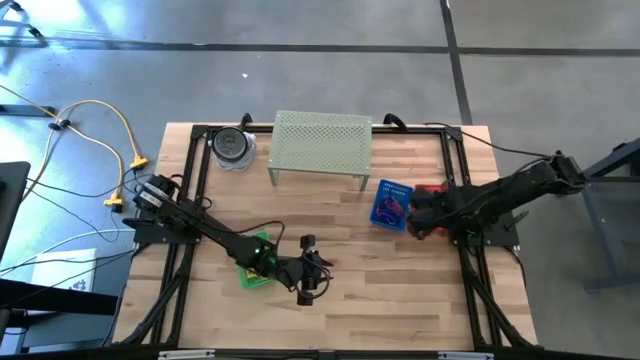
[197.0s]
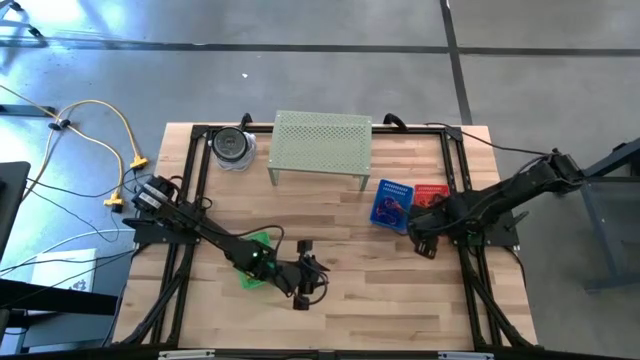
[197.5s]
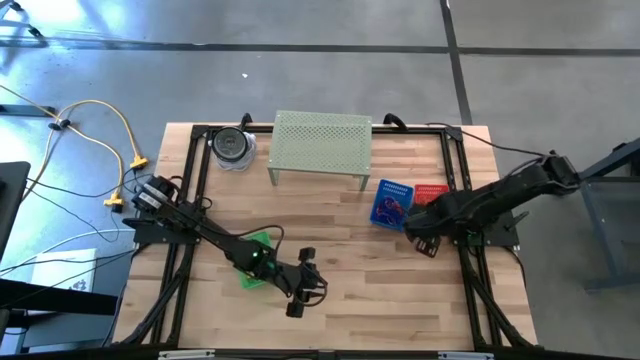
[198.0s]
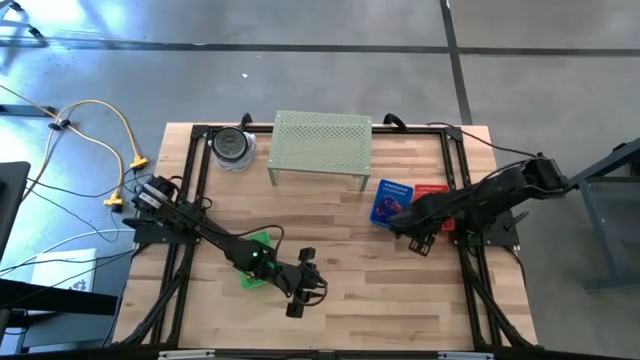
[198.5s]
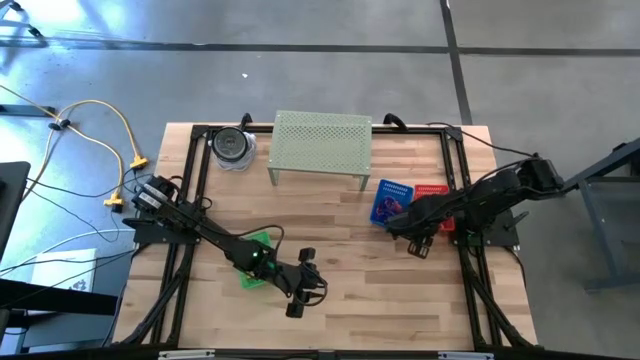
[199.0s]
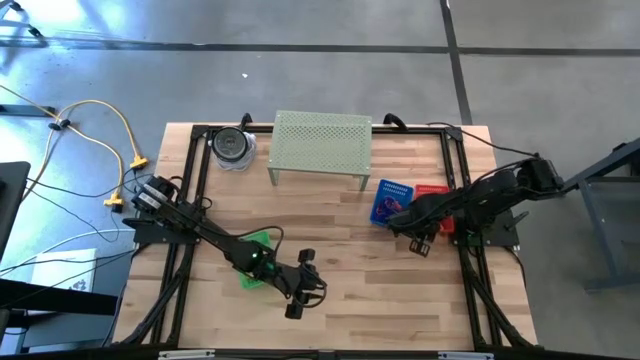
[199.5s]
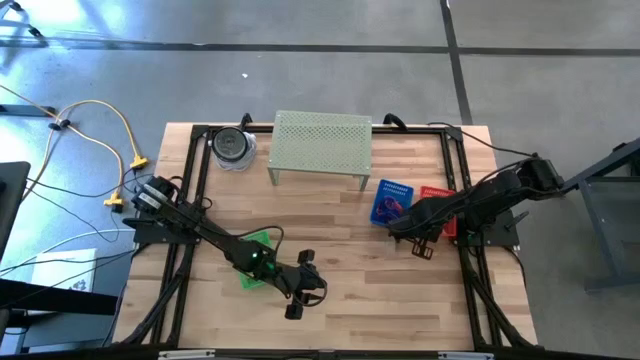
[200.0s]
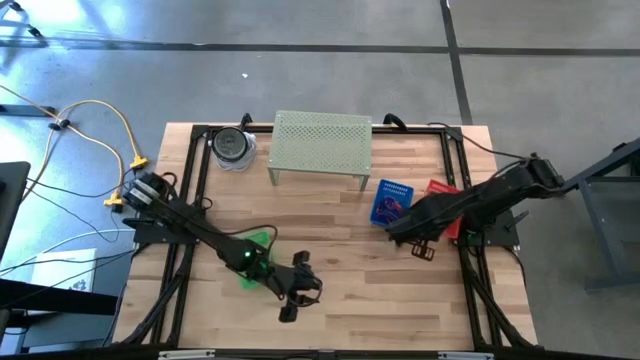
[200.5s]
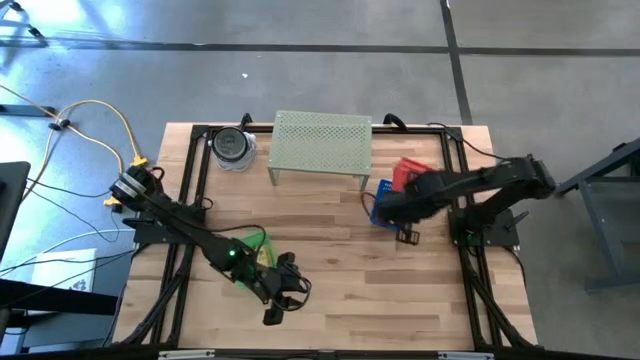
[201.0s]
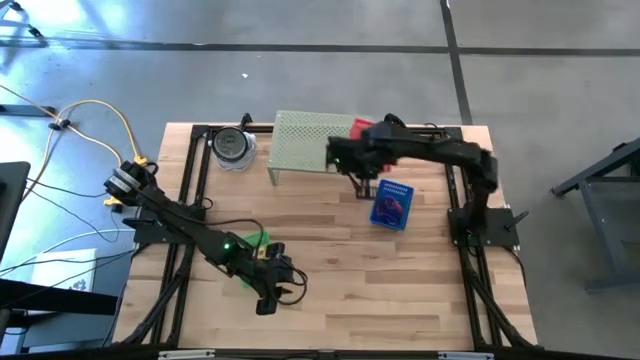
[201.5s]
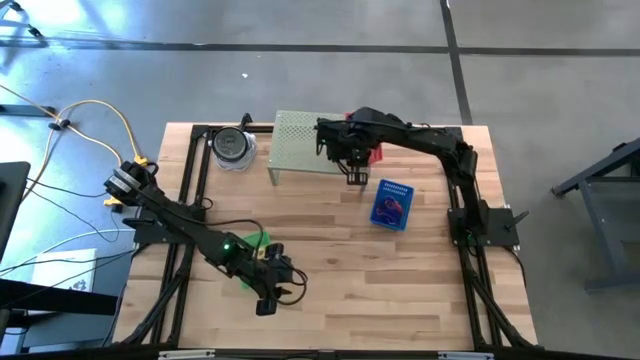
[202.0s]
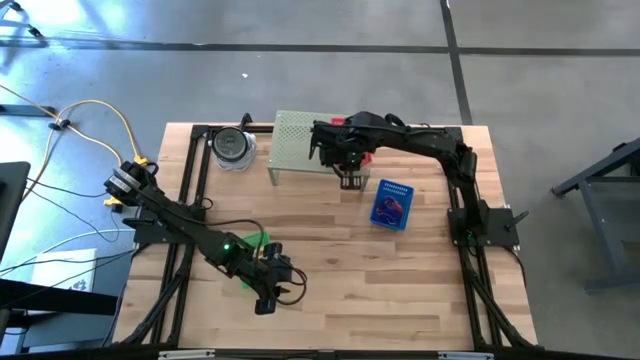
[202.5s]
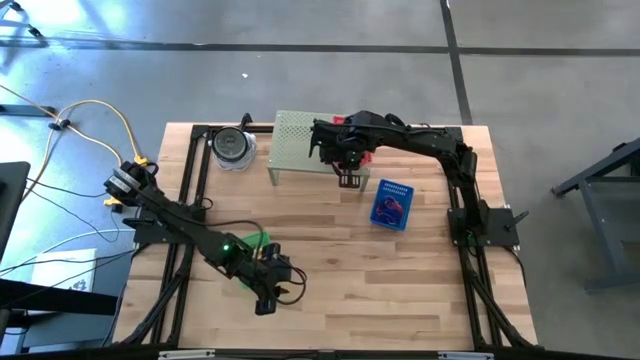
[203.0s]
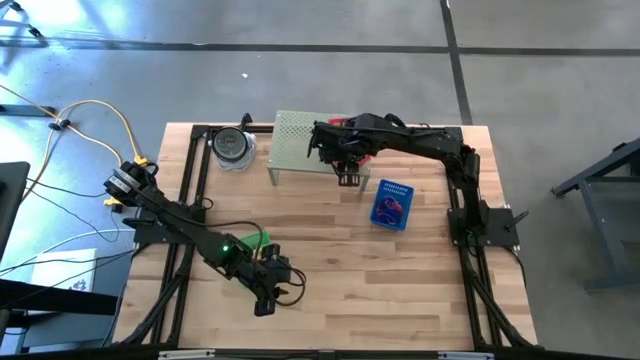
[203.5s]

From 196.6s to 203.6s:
Task: Pick & Place Office Desk Supplies
Put the red bin on the shelf

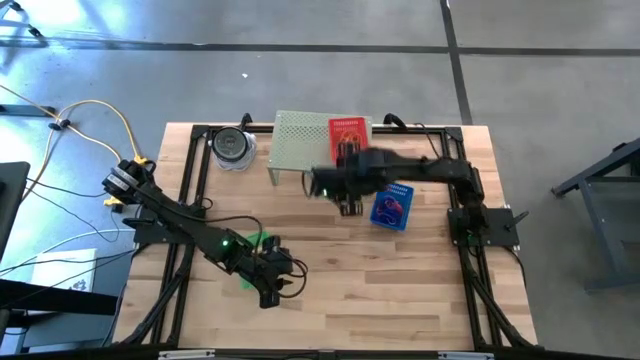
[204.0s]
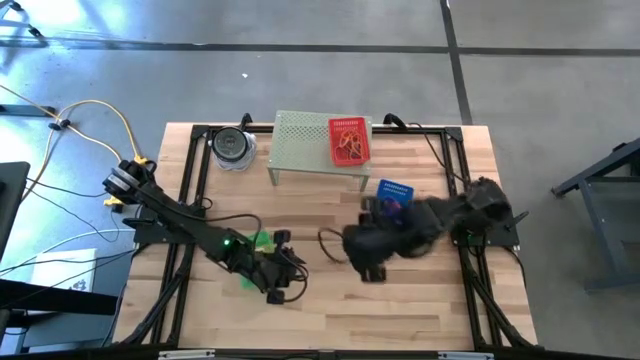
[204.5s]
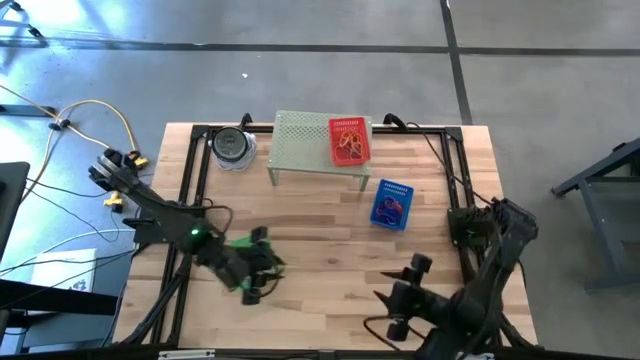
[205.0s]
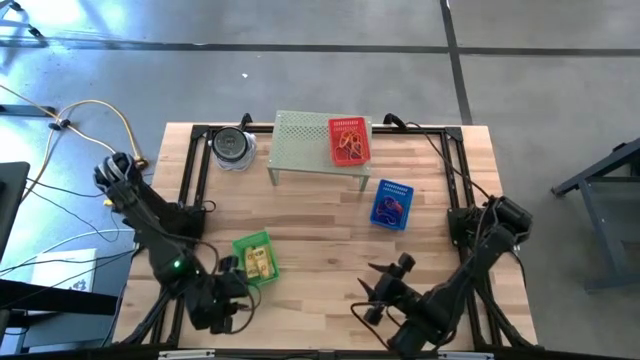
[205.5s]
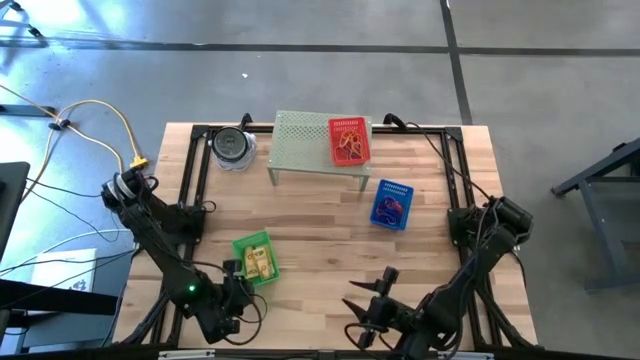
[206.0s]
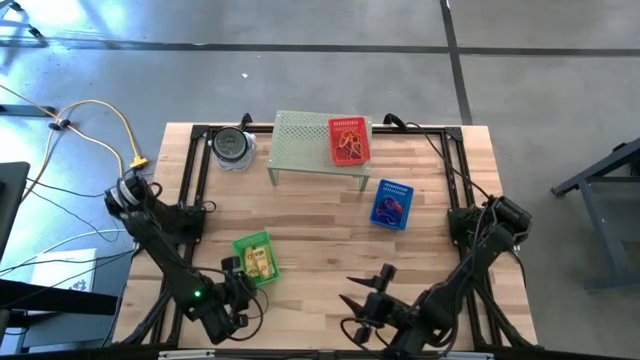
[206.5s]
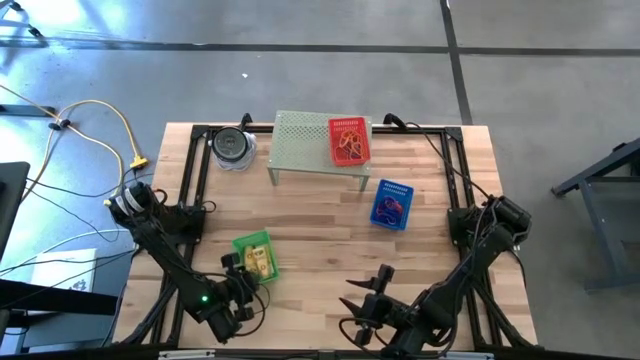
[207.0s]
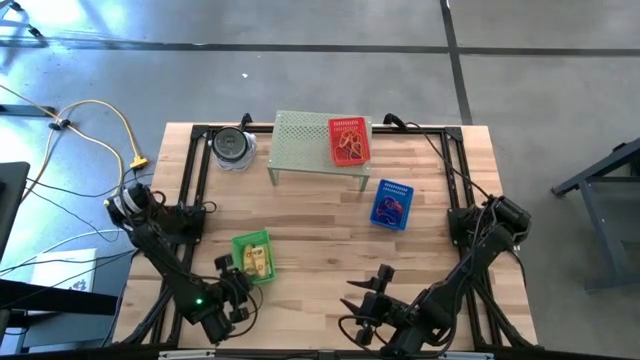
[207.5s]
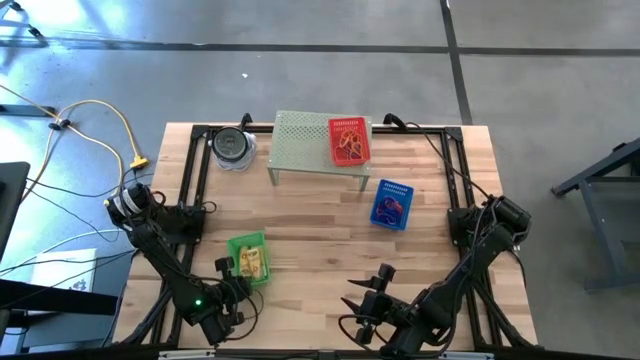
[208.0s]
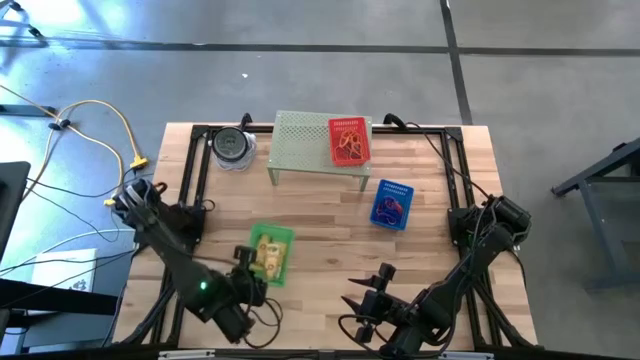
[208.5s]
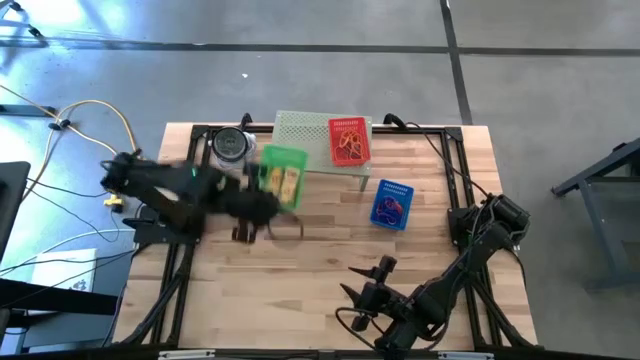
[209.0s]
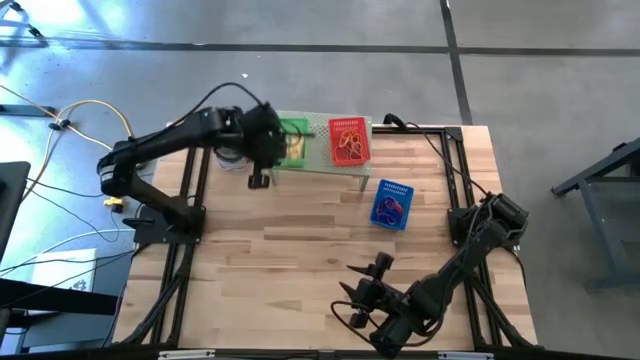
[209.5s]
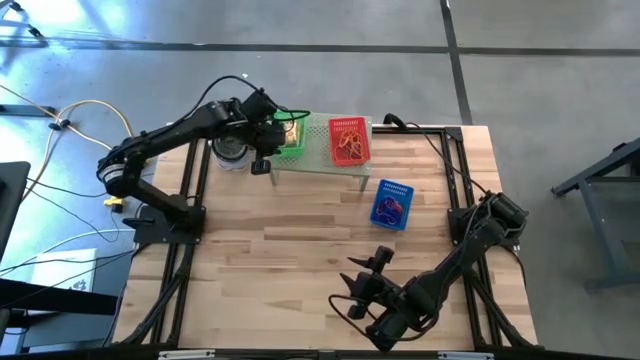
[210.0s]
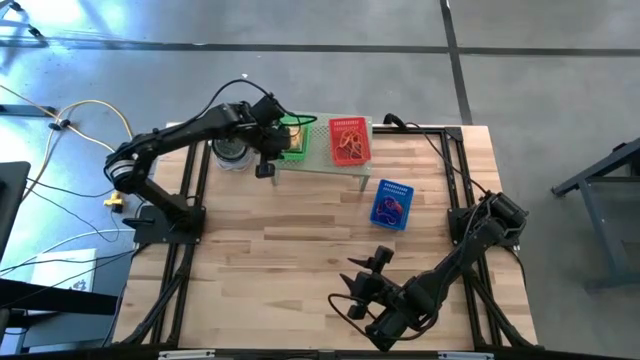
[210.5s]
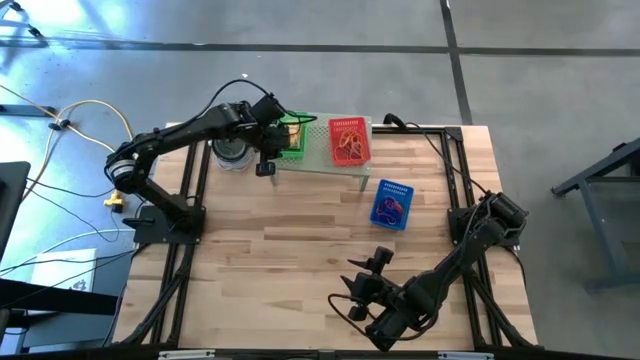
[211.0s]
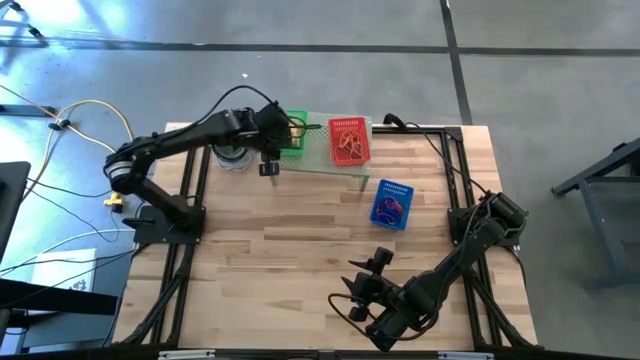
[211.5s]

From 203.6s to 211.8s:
Put the green on the shelf

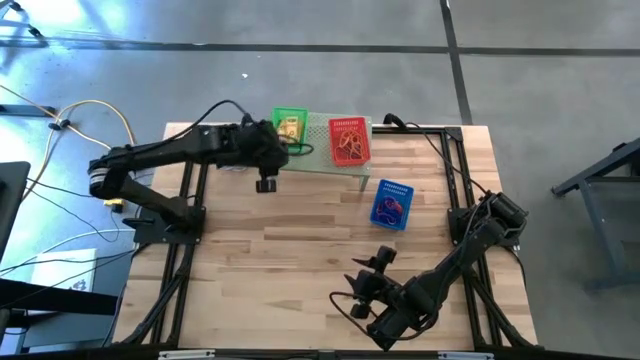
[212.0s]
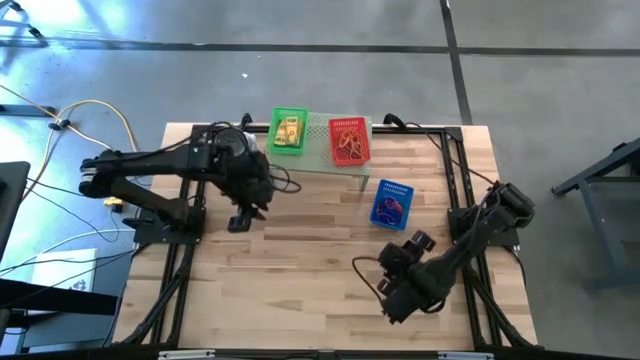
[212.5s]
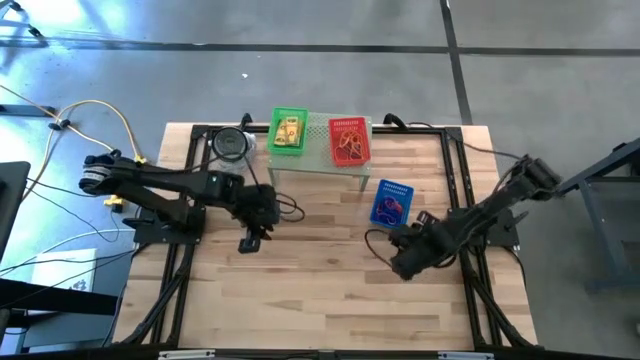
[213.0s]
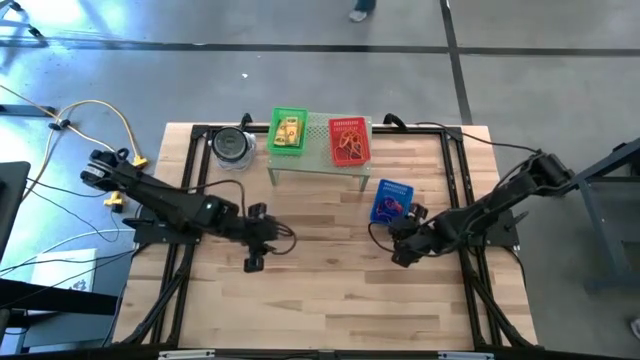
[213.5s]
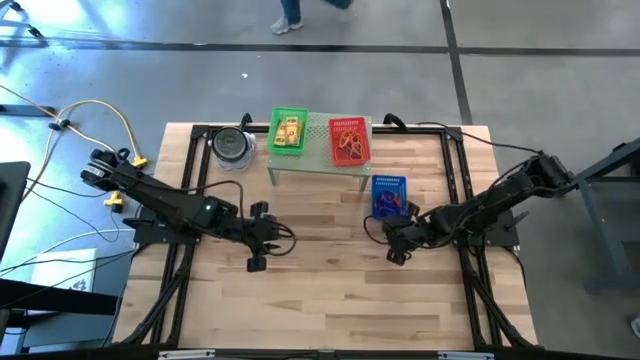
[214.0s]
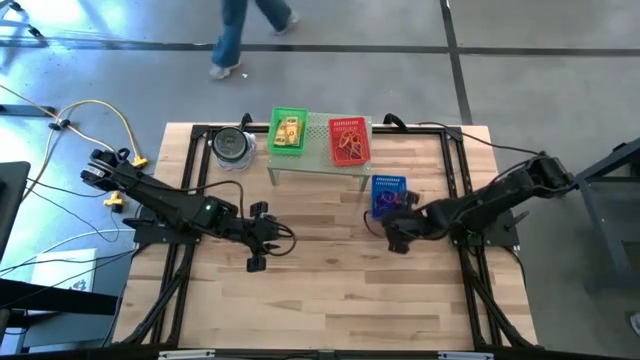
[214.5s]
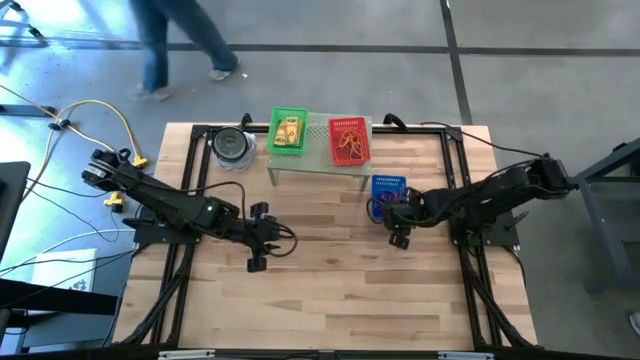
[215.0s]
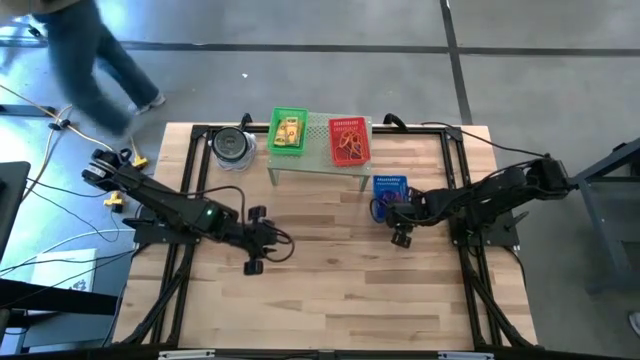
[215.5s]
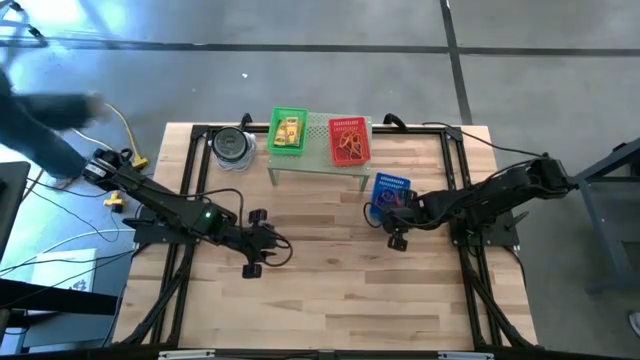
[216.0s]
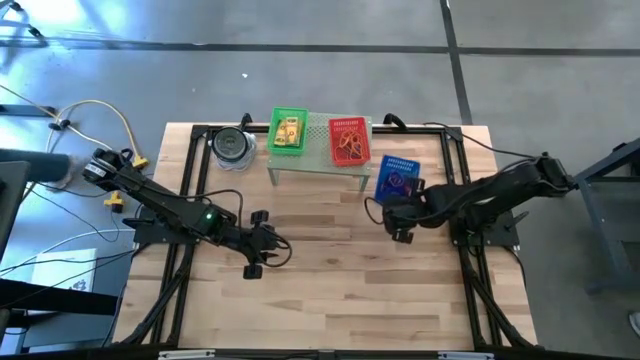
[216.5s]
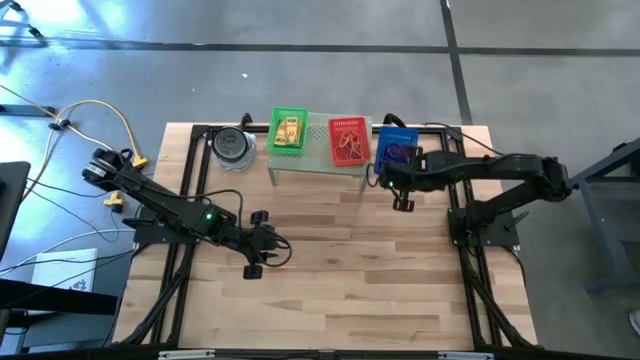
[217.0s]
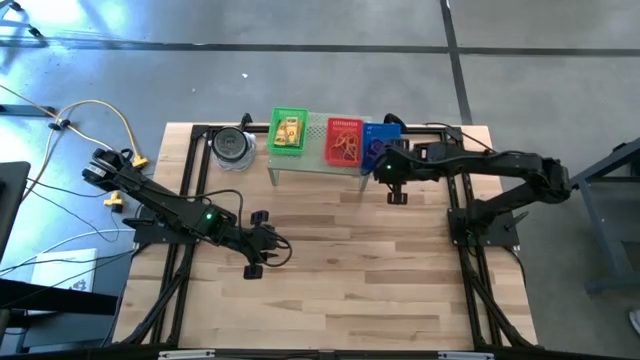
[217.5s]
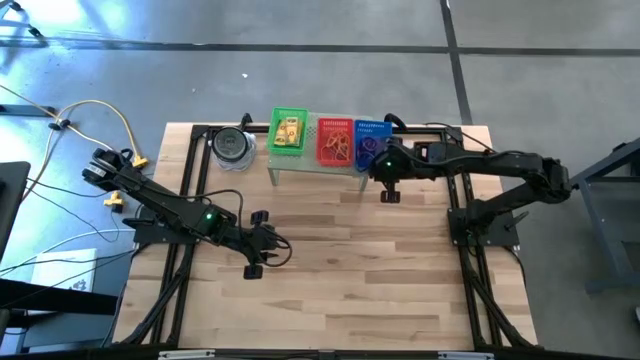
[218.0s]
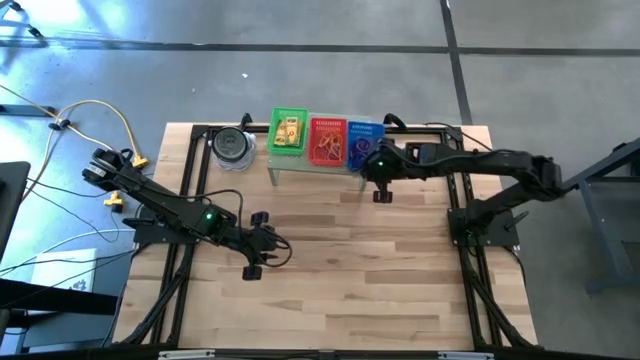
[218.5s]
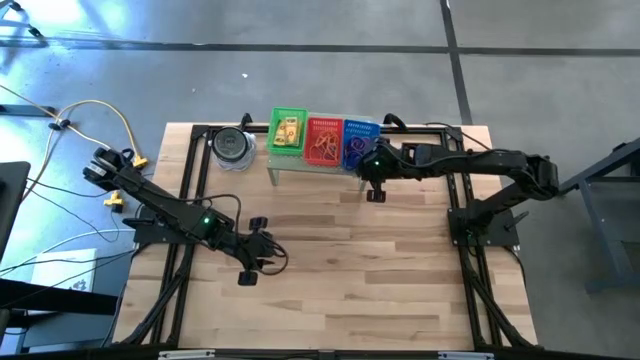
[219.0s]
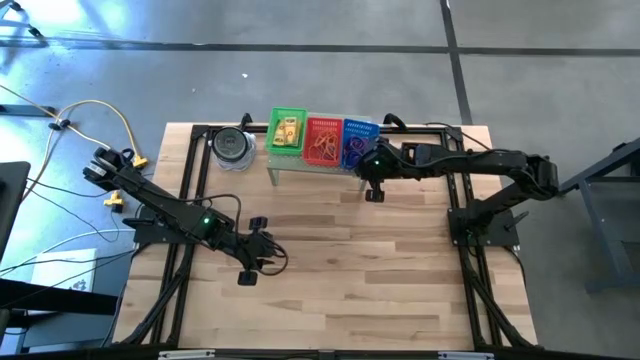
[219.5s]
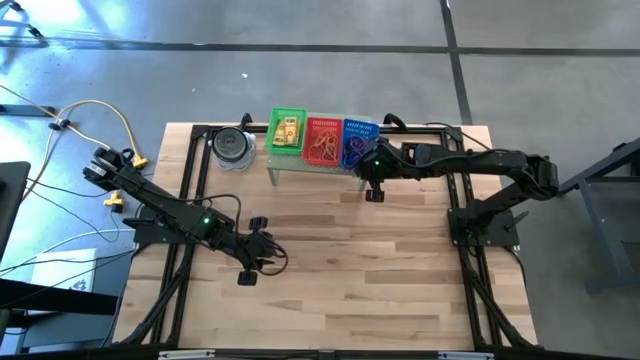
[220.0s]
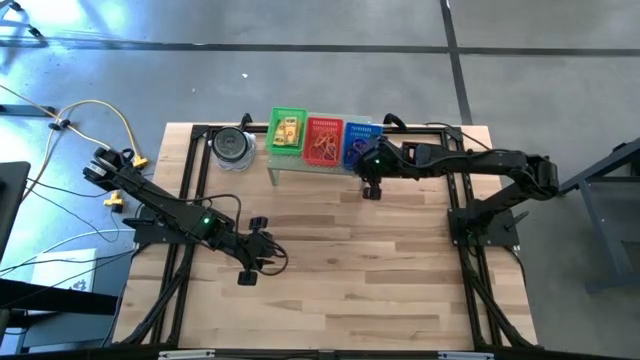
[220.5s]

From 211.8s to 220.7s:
Put the blue bin on the shelf
